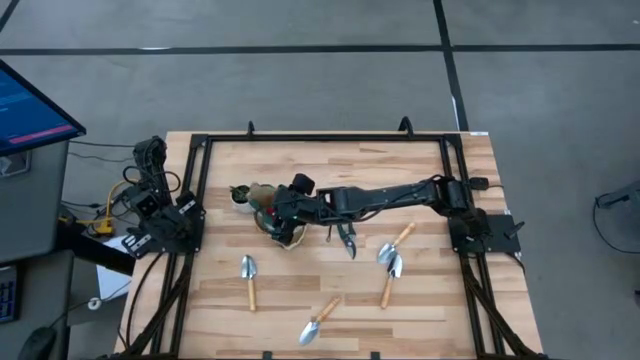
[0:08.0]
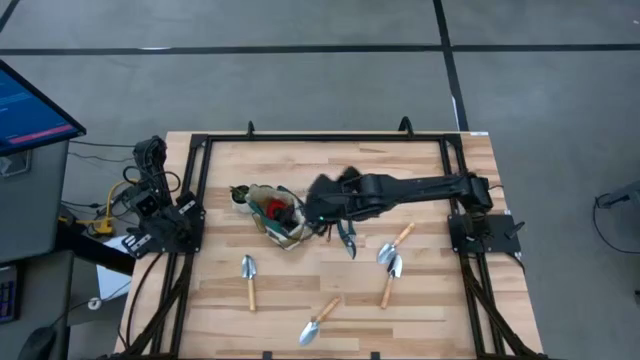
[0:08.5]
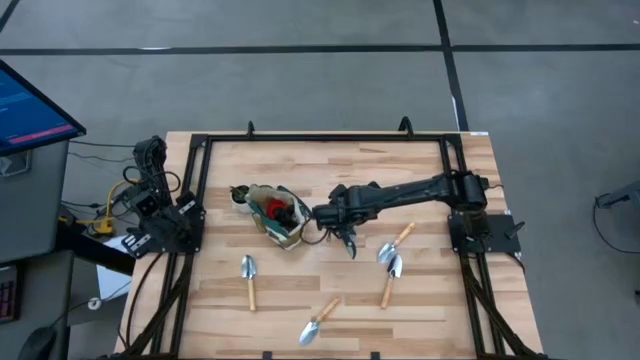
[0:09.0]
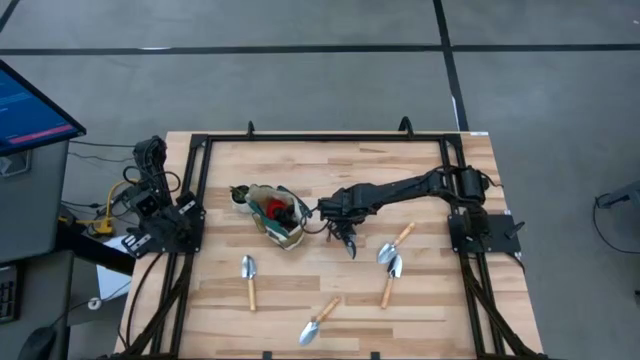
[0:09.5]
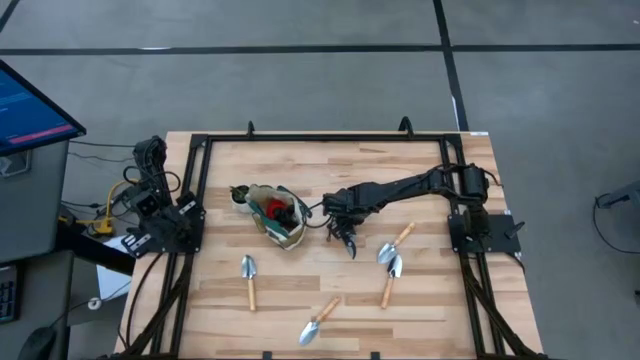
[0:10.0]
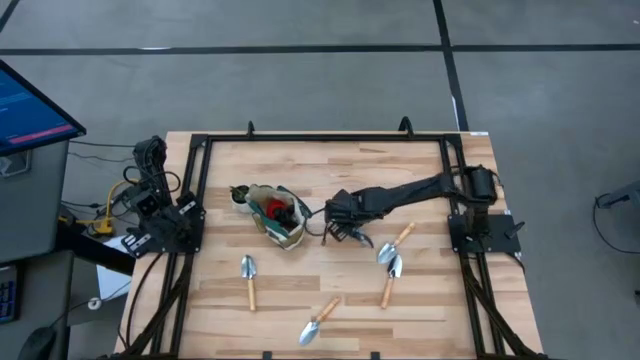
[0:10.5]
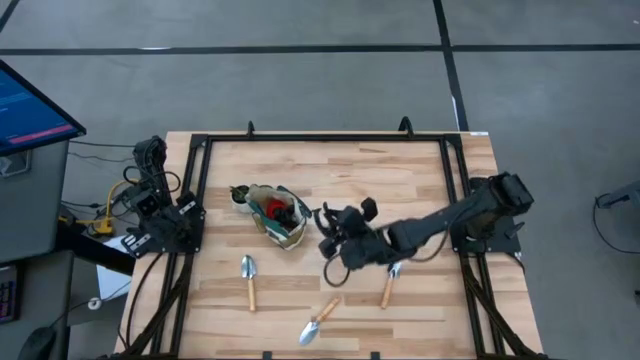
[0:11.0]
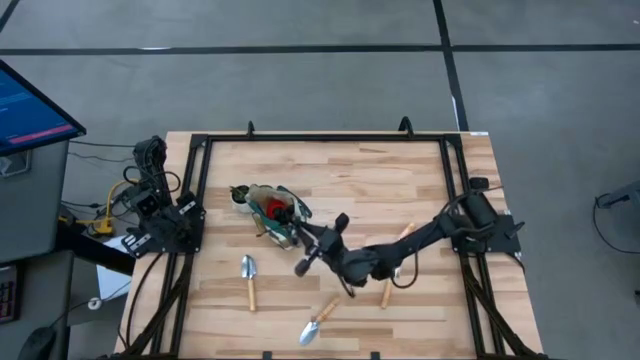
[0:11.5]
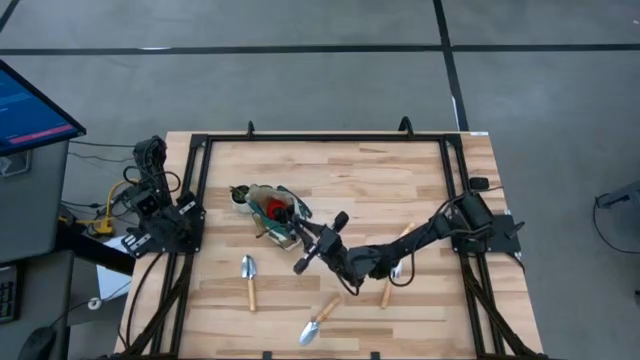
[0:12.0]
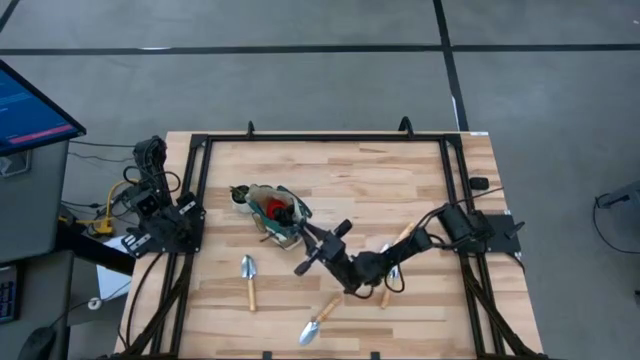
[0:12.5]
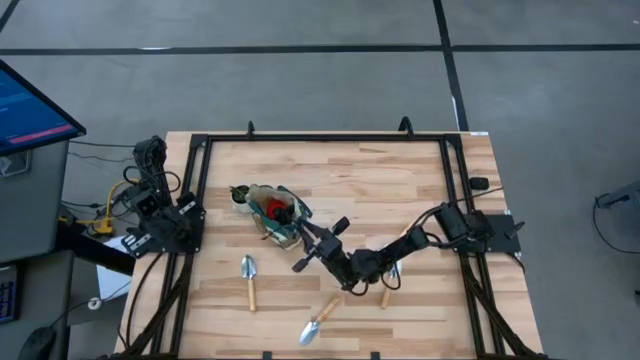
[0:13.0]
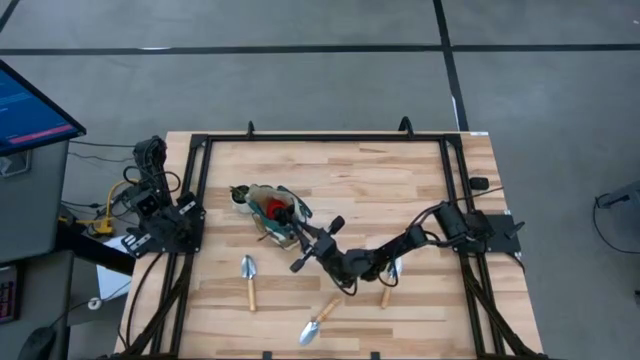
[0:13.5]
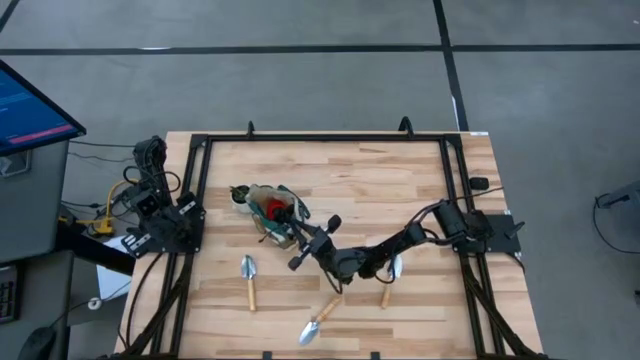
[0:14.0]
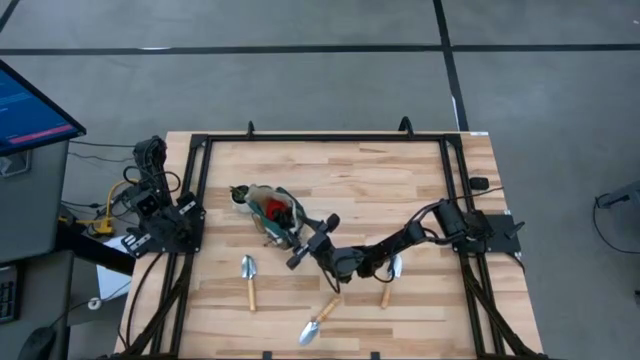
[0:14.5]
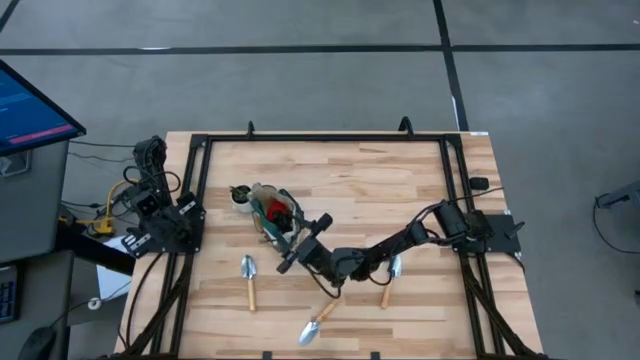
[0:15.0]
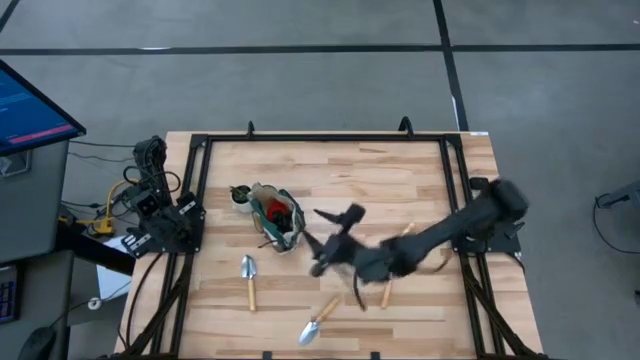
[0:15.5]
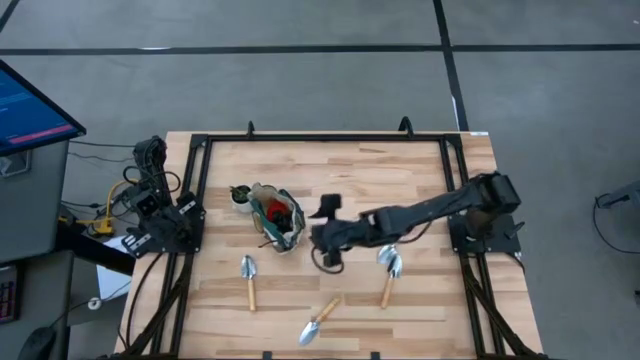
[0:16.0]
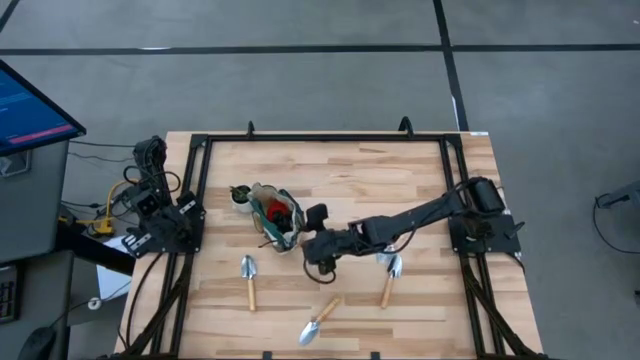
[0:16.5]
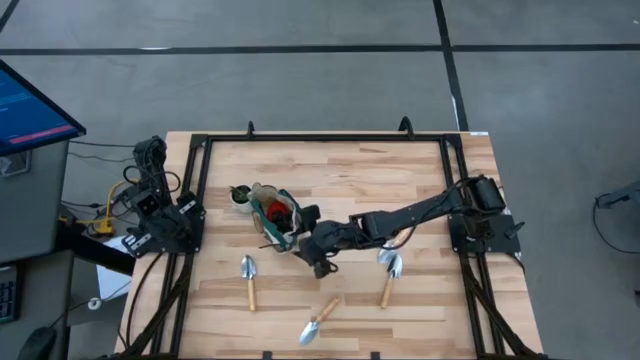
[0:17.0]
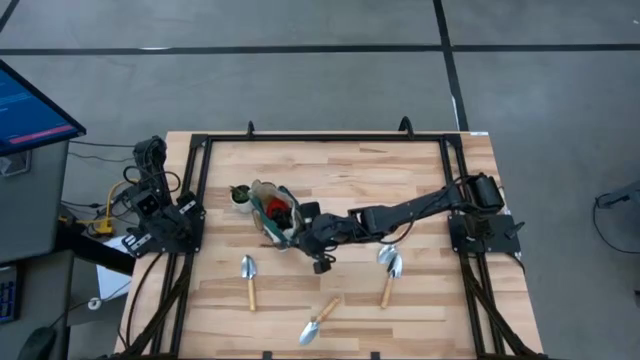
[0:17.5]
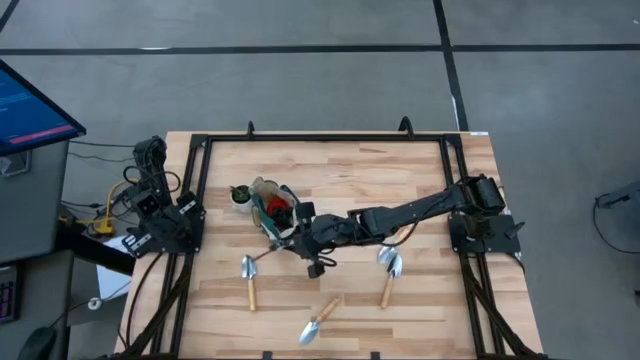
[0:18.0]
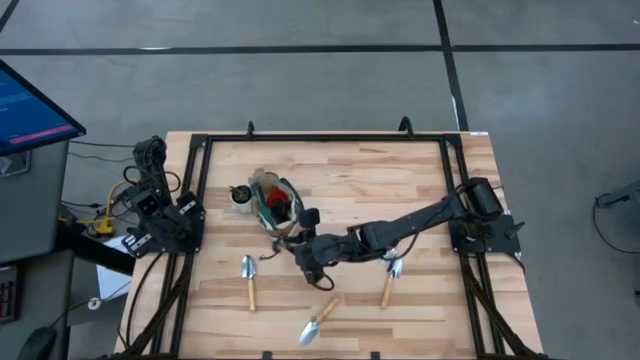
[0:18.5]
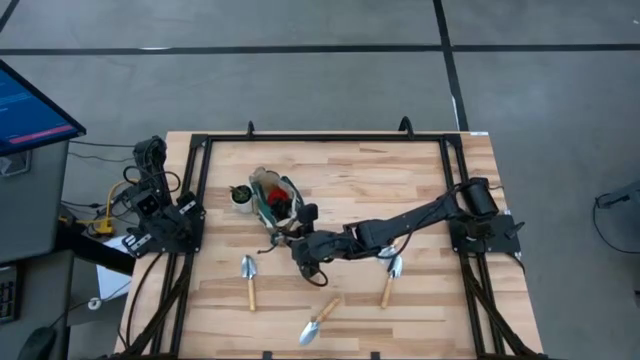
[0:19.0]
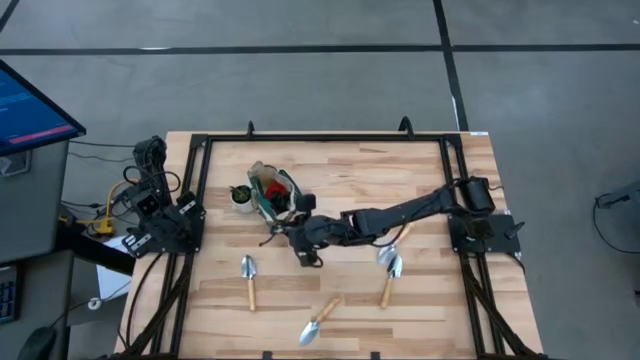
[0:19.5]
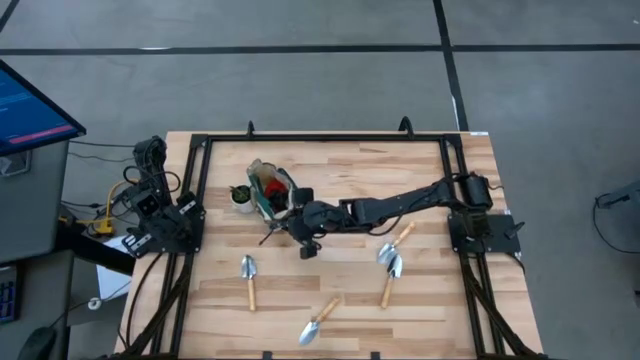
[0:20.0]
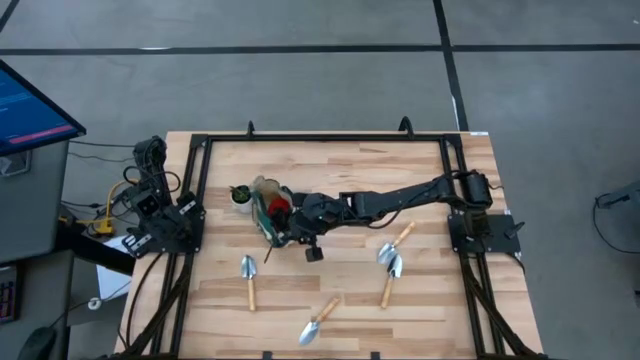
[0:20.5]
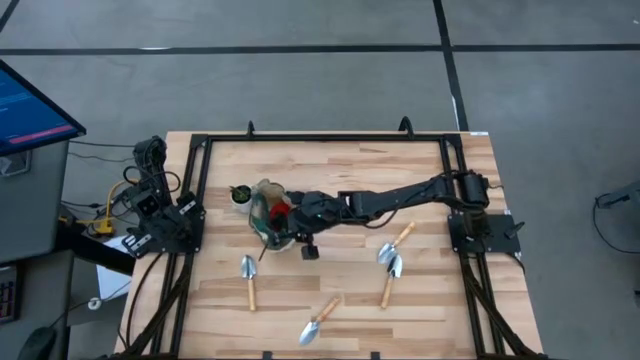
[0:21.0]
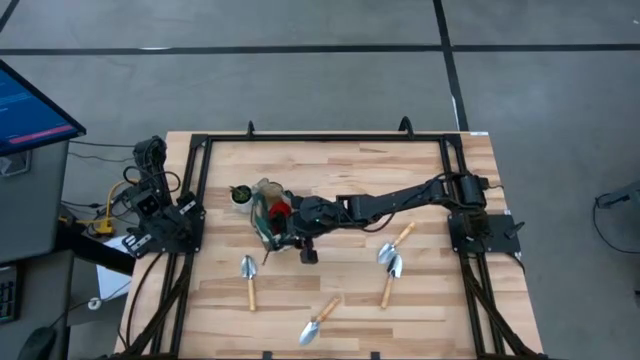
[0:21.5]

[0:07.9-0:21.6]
Task: Pick & Place Garden tools in Gardening bag
Put the shear scissors into the gardening bag
